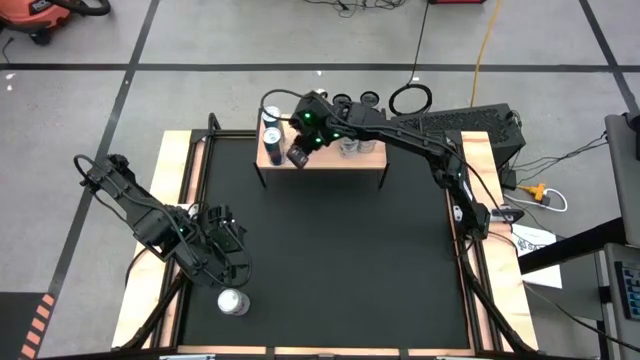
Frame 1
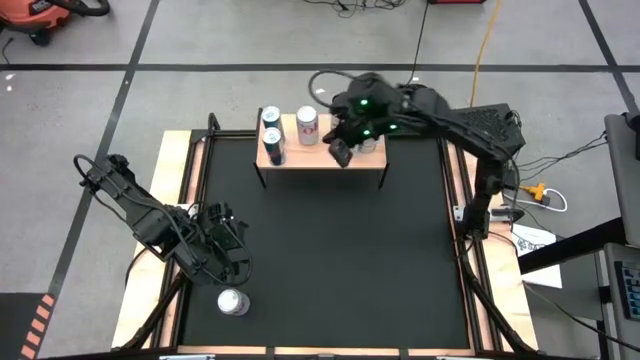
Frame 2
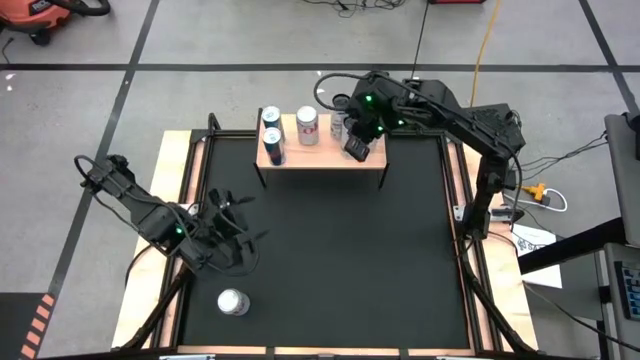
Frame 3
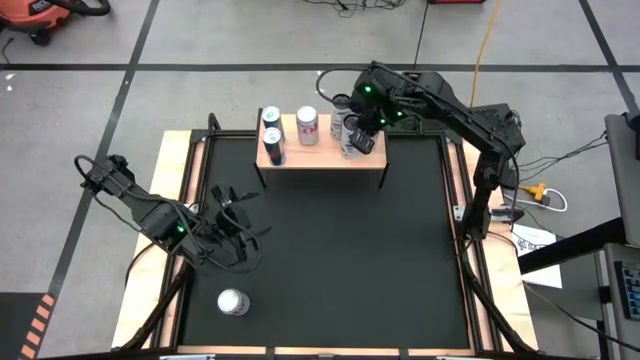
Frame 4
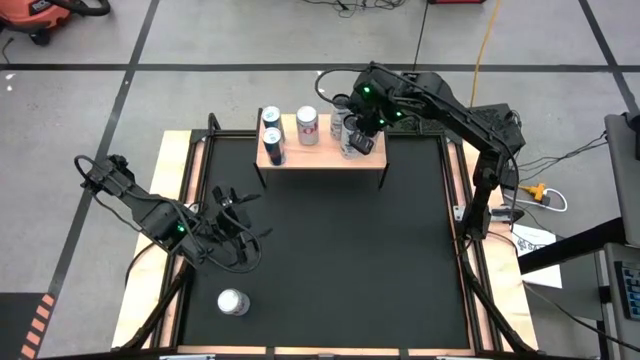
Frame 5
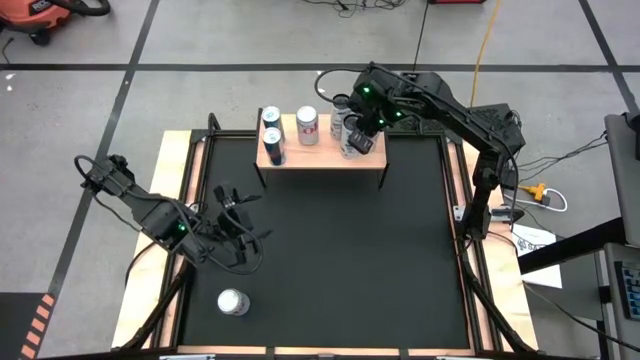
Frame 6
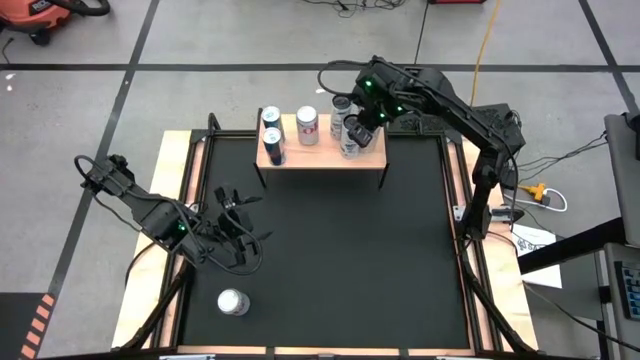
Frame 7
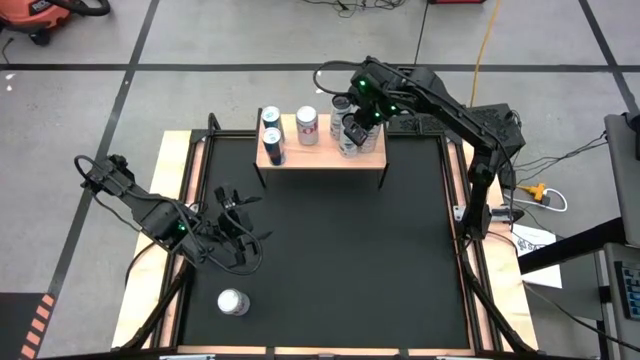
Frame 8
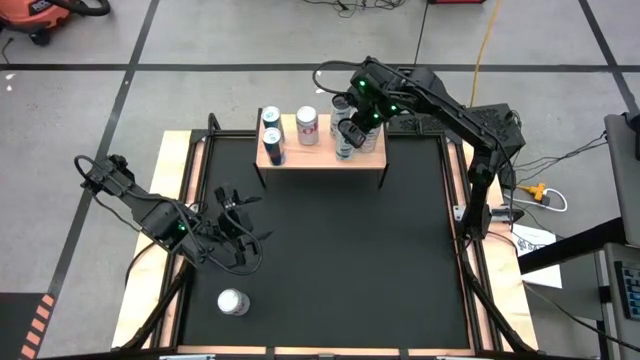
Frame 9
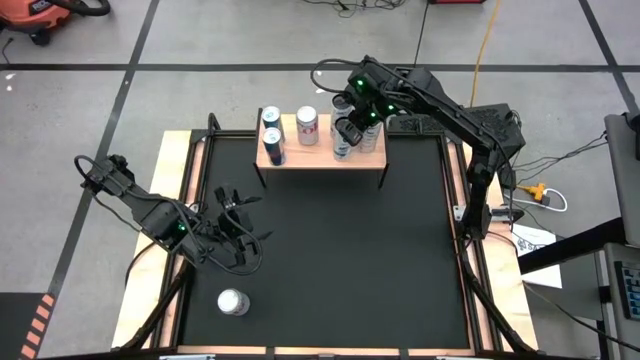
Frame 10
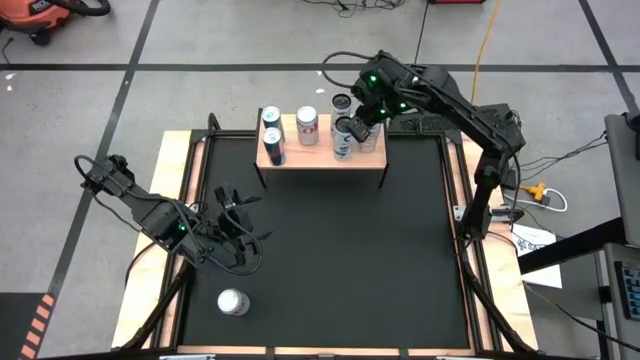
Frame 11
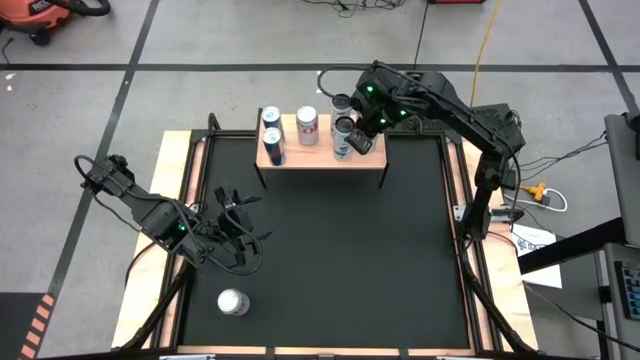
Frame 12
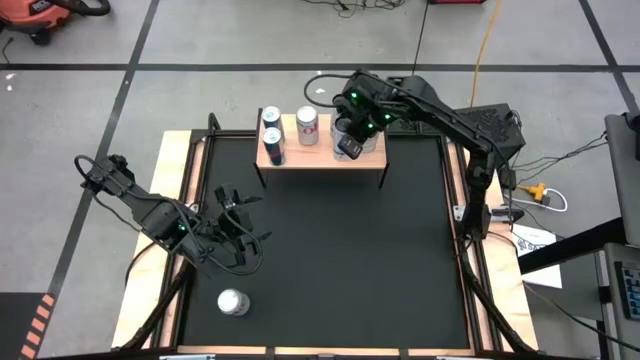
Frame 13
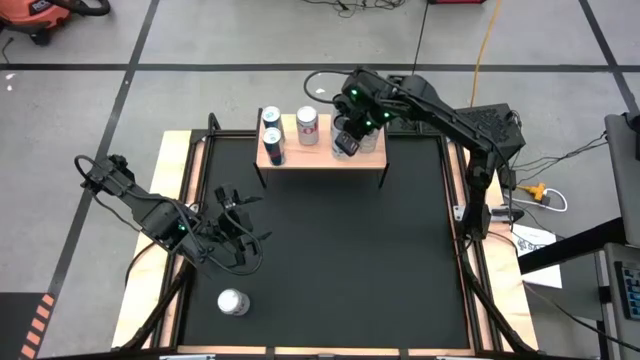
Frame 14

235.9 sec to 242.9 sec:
Task: Place canned beverage on shelf
Adjust the white blue soda can on the shelf

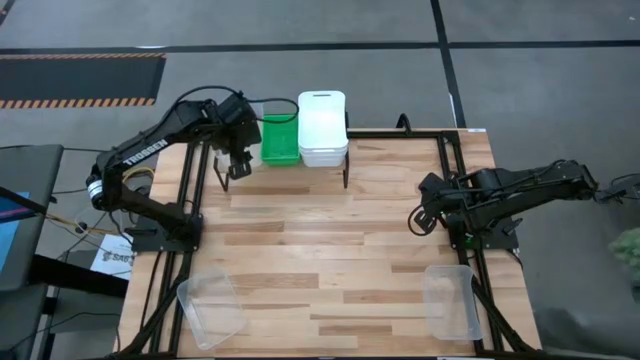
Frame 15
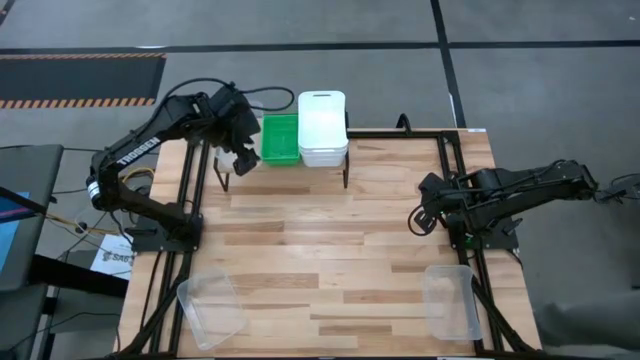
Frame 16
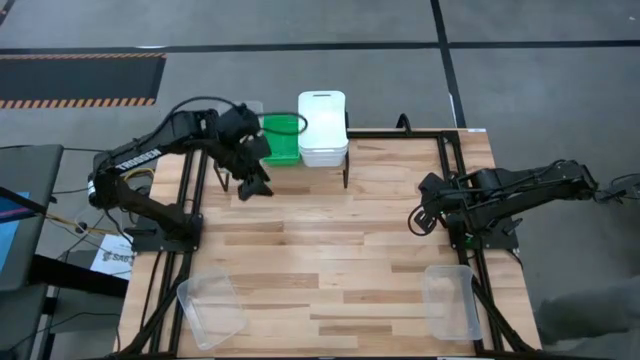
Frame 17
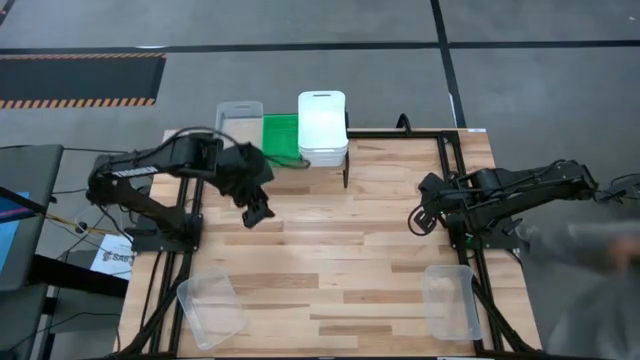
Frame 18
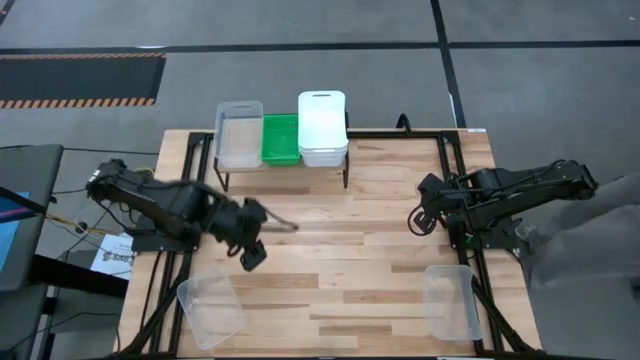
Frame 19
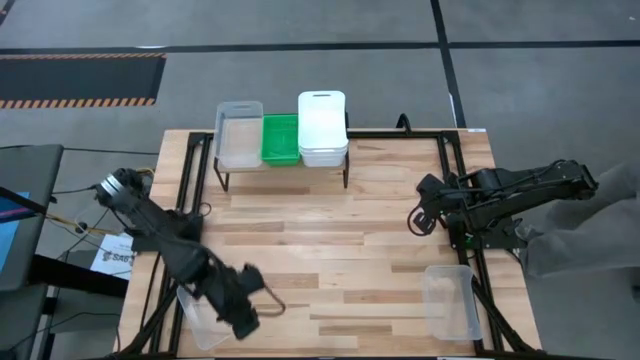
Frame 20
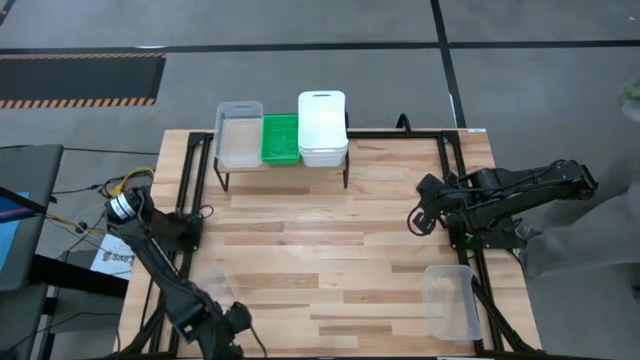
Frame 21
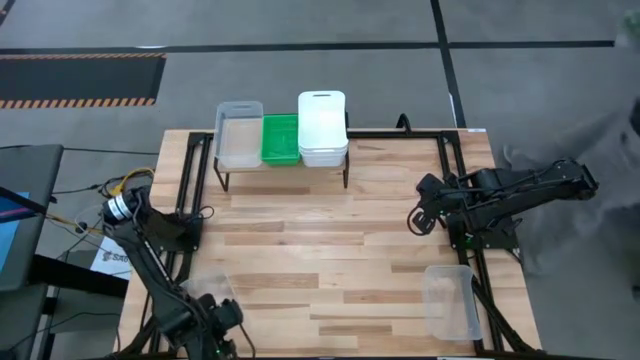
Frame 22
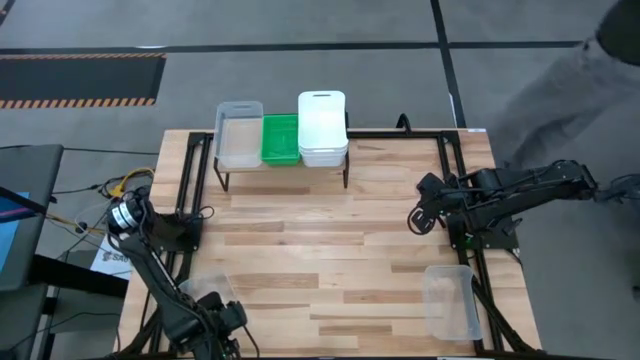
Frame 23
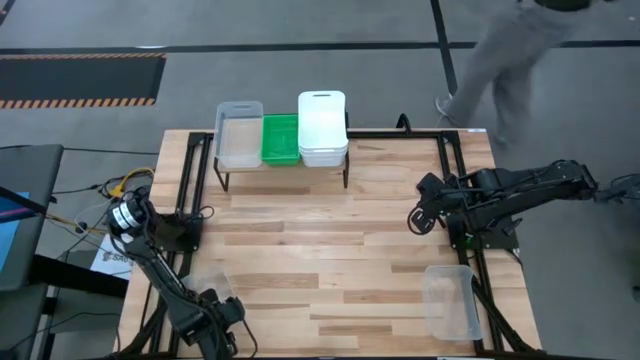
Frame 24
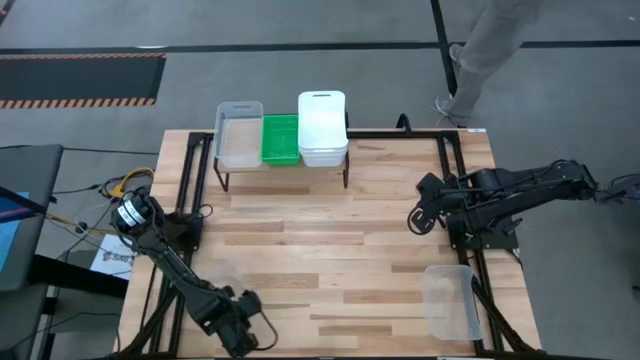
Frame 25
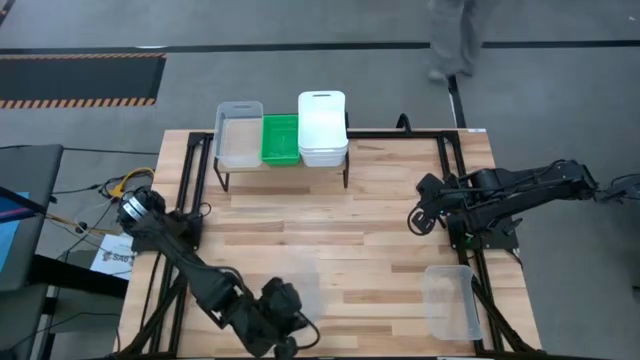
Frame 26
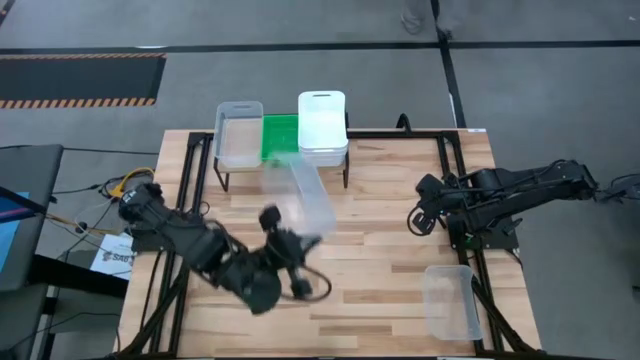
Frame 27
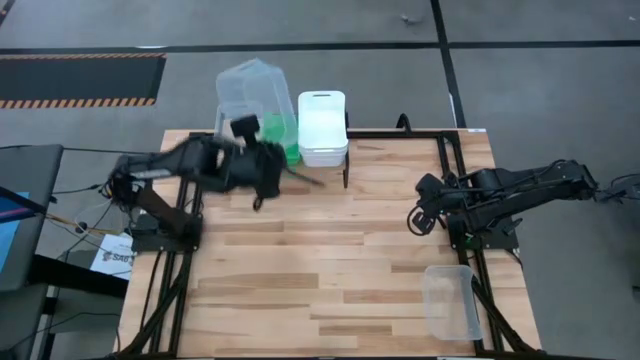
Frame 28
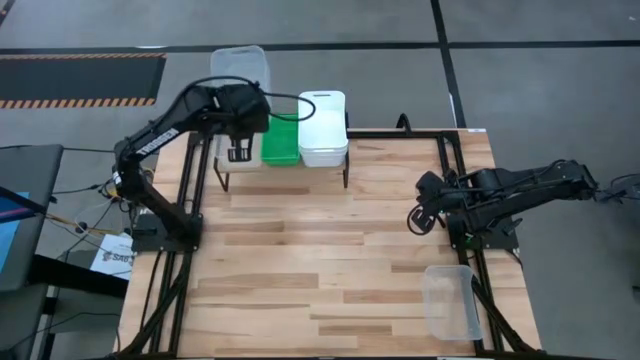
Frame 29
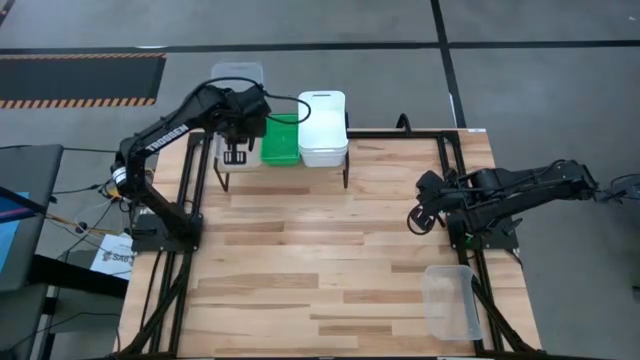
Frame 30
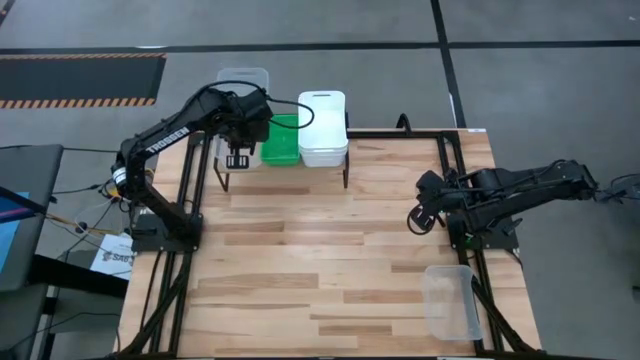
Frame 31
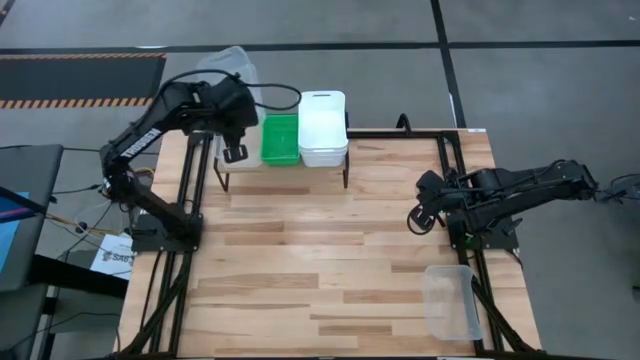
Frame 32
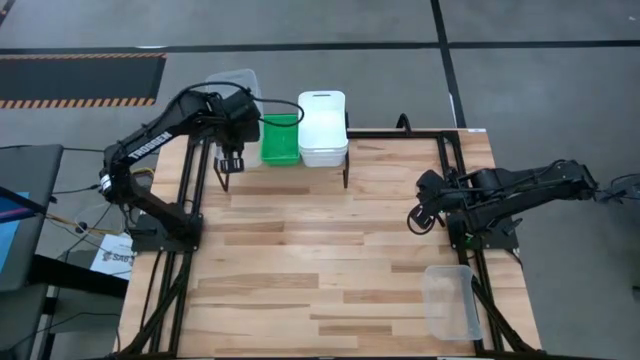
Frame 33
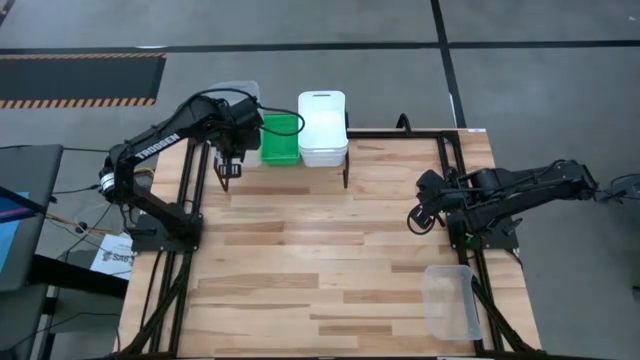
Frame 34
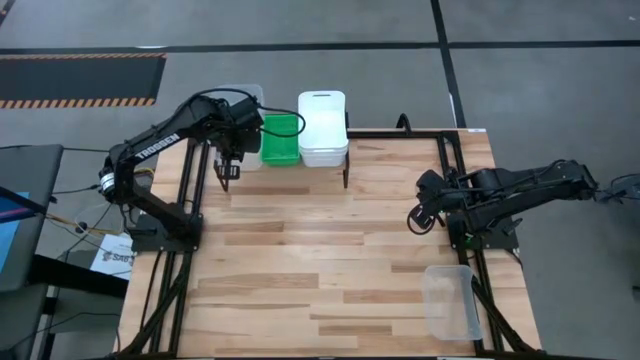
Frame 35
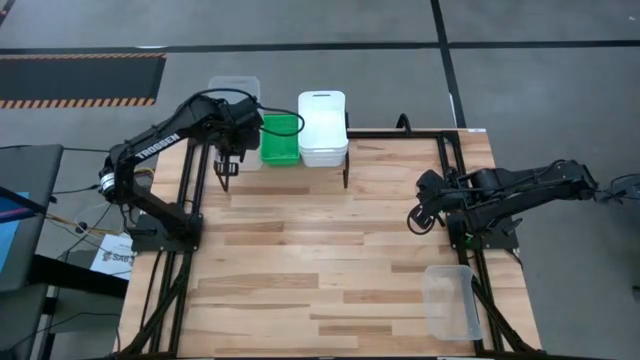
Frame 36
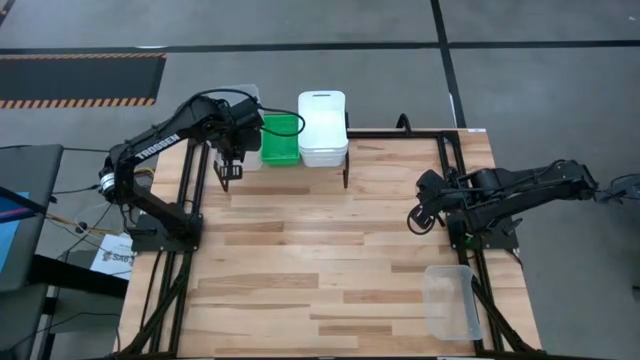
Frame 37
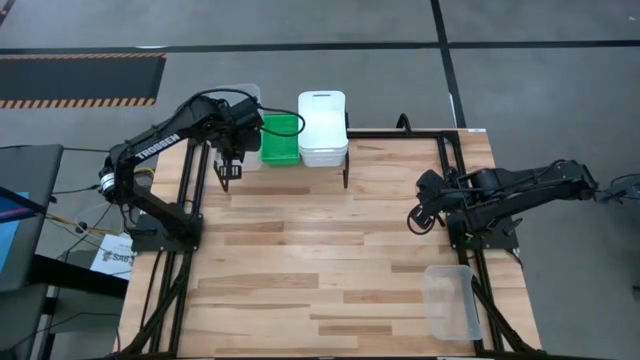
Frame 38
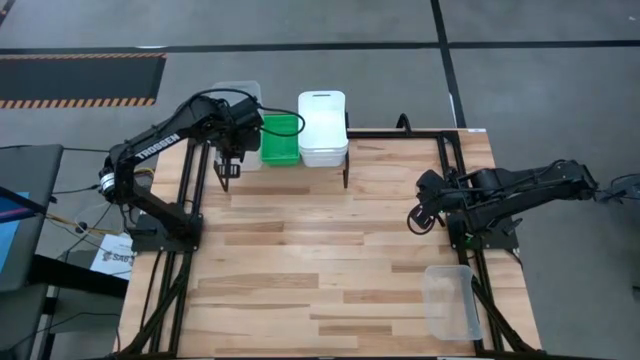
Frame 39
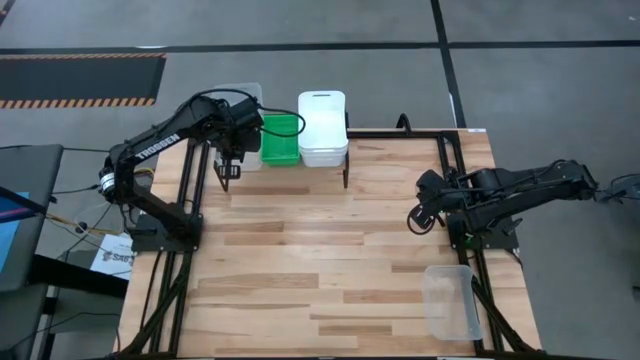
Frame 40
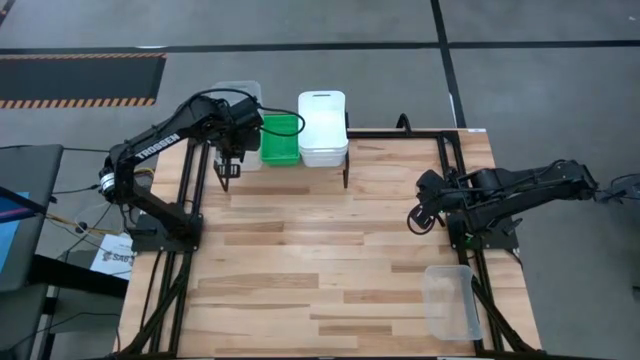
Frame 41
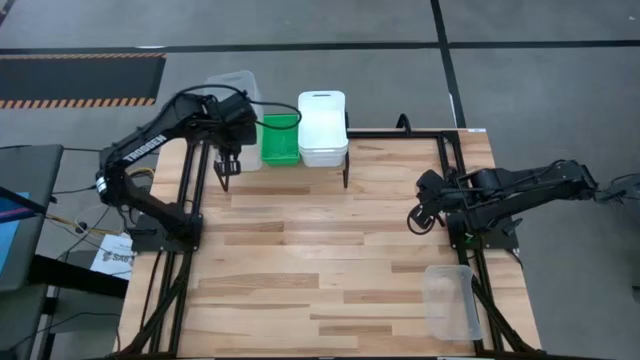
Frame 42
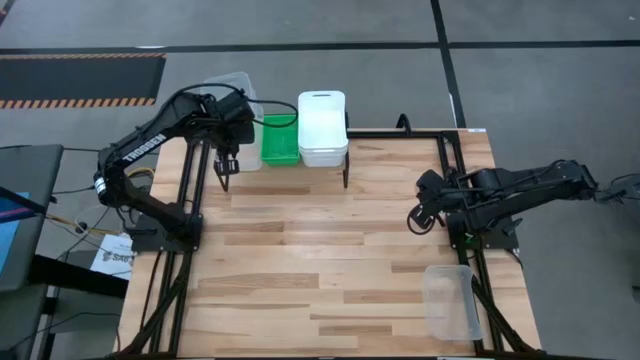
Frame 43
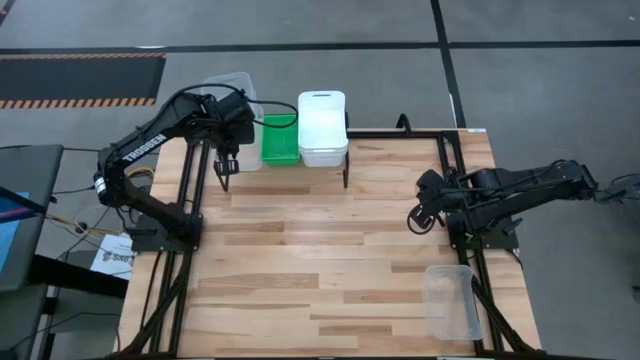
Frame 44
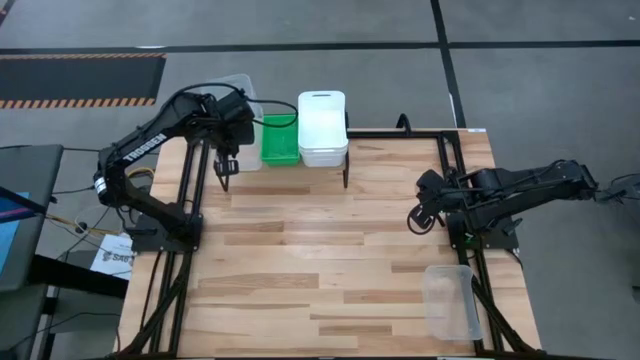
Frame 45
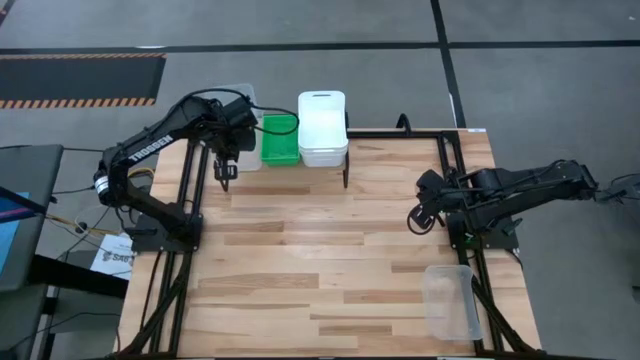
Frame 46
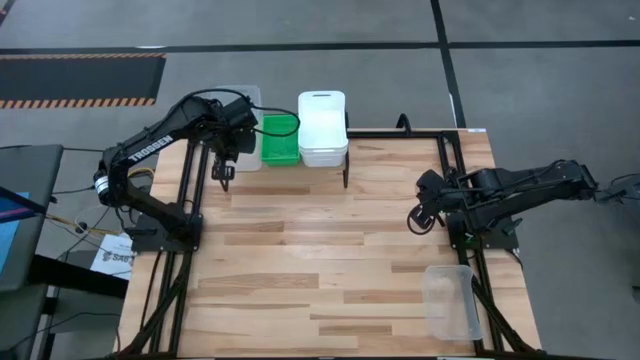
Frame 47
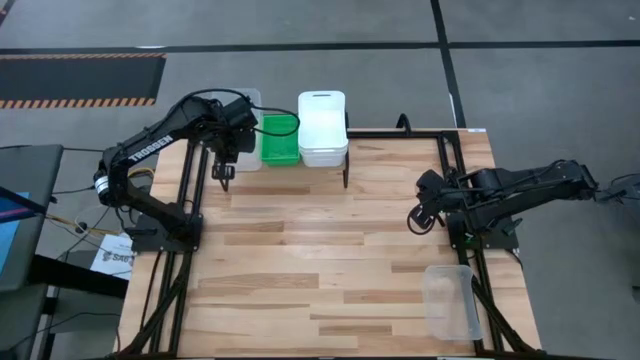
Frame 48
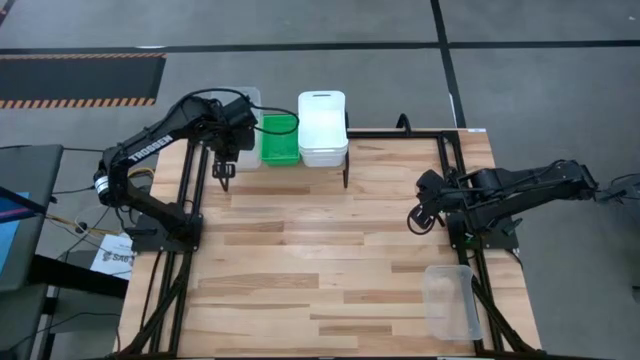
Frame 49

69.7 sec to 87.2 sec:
Task: Stack baskets on shelf by color
Stack the left transparent bin on top of the transparent bin on the shelf
